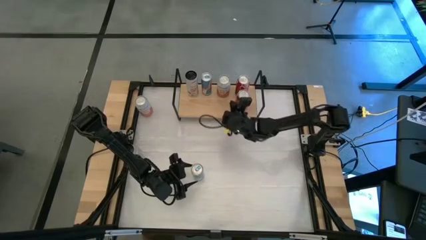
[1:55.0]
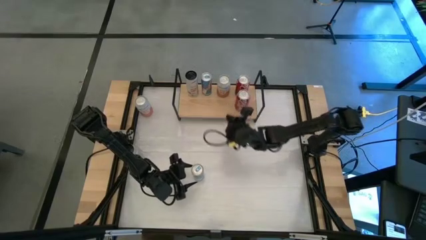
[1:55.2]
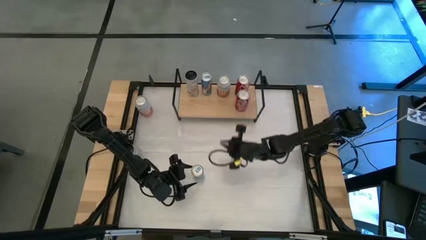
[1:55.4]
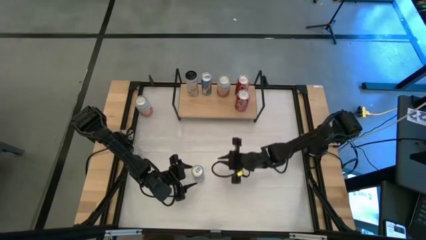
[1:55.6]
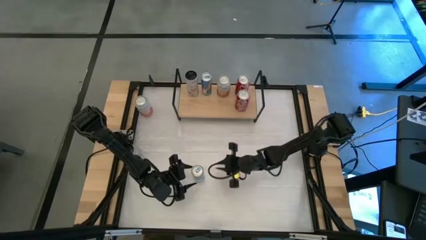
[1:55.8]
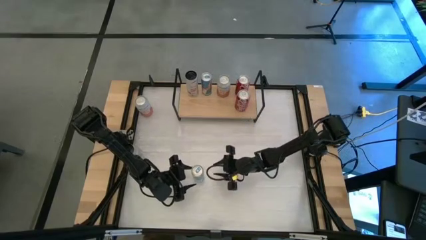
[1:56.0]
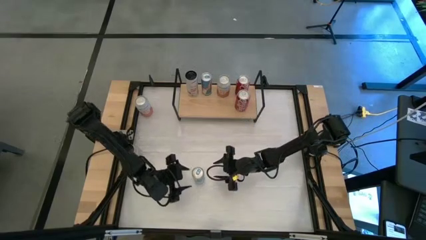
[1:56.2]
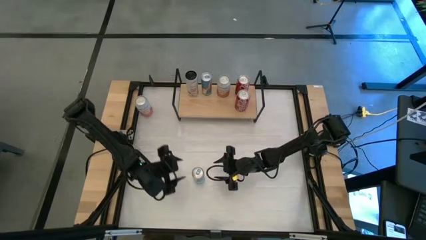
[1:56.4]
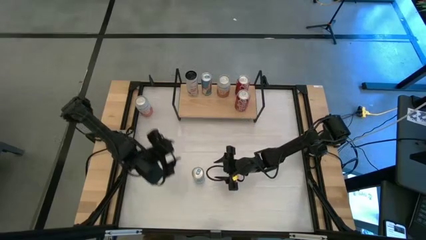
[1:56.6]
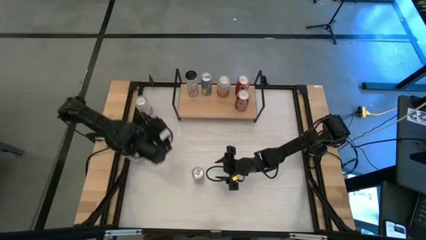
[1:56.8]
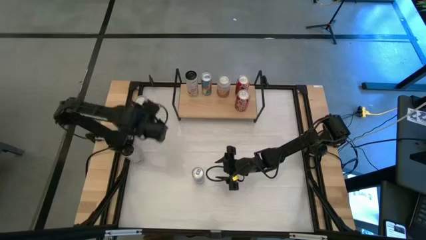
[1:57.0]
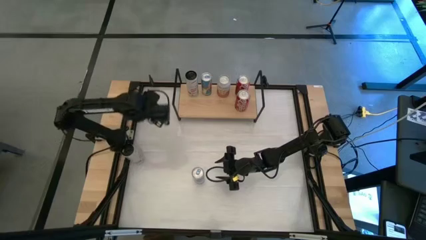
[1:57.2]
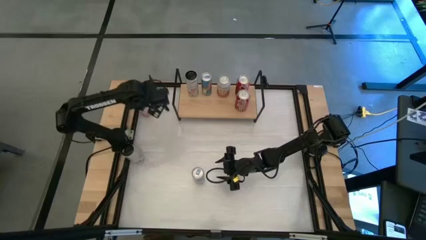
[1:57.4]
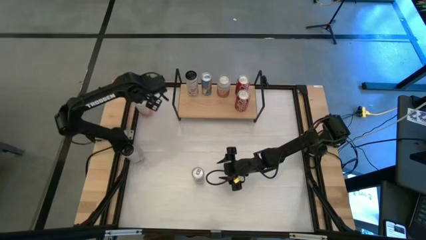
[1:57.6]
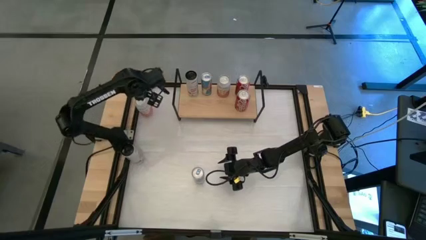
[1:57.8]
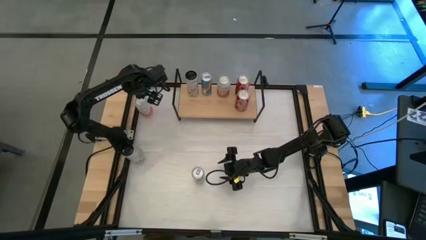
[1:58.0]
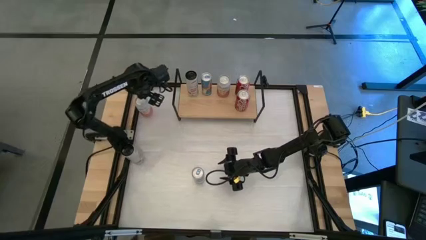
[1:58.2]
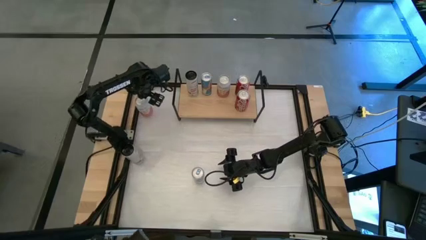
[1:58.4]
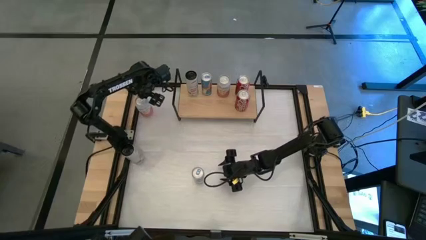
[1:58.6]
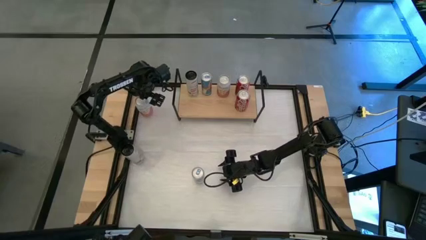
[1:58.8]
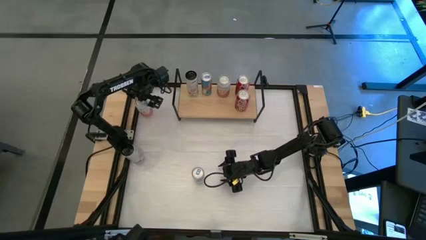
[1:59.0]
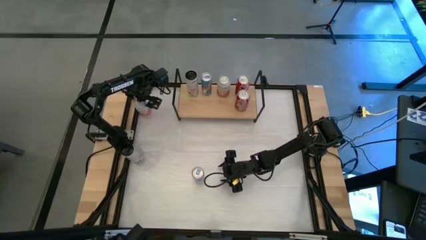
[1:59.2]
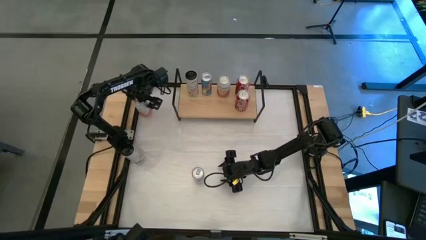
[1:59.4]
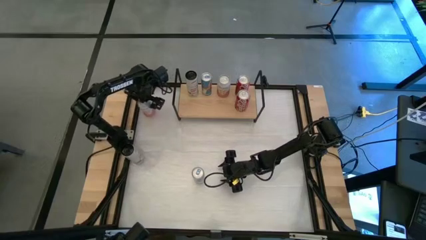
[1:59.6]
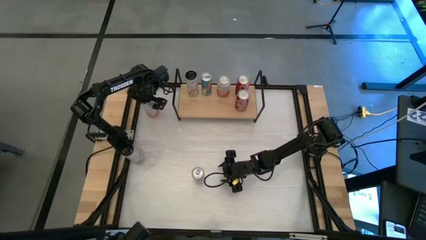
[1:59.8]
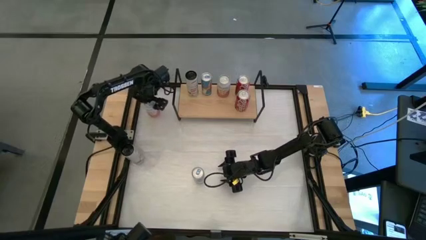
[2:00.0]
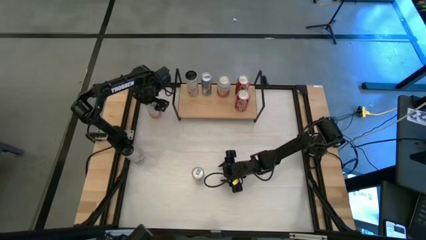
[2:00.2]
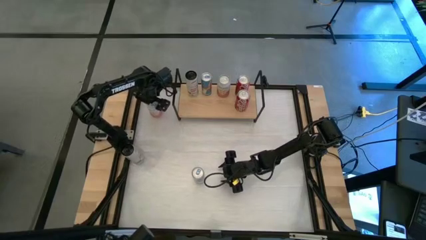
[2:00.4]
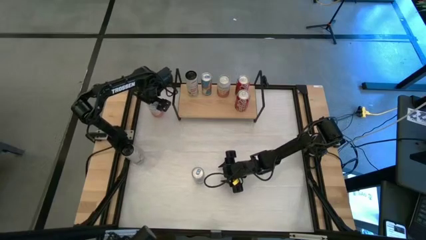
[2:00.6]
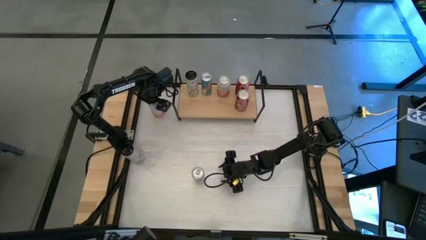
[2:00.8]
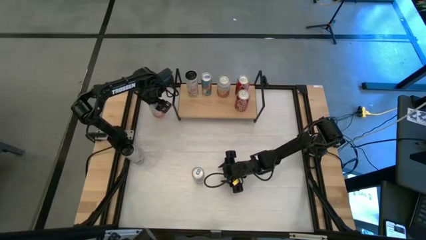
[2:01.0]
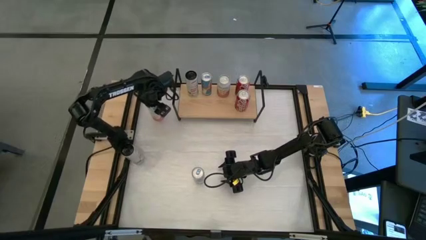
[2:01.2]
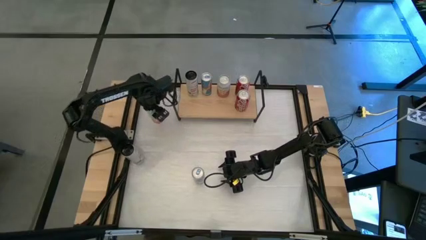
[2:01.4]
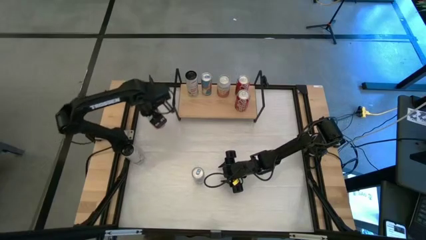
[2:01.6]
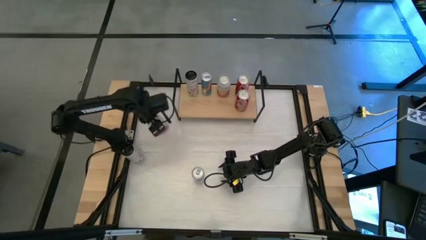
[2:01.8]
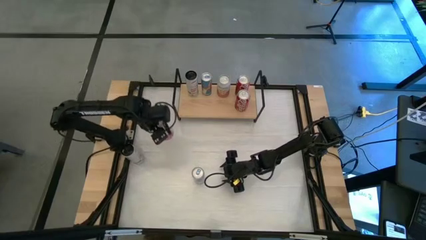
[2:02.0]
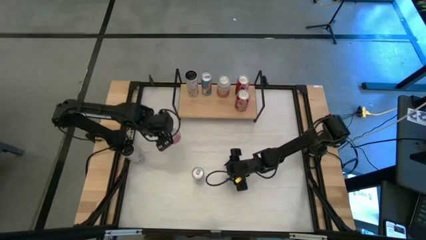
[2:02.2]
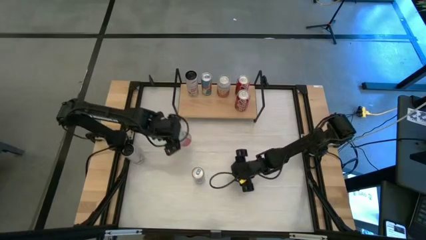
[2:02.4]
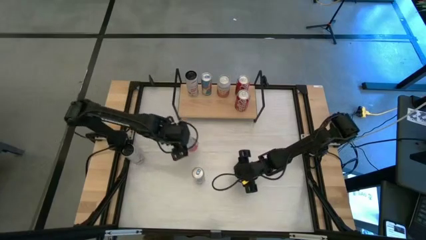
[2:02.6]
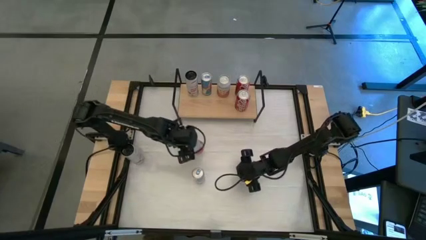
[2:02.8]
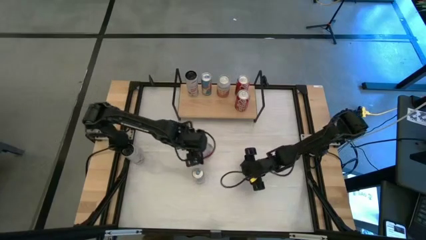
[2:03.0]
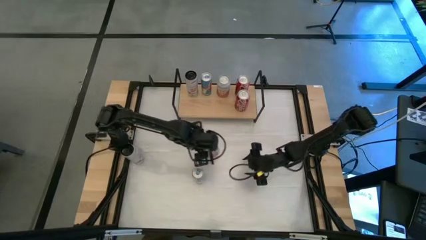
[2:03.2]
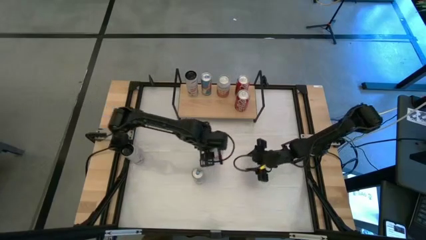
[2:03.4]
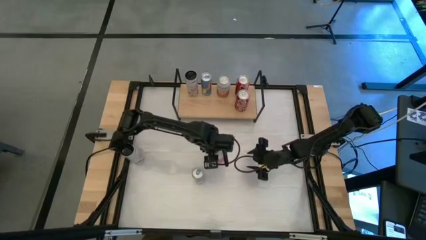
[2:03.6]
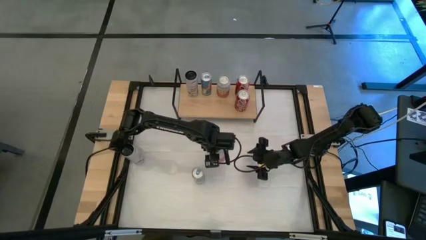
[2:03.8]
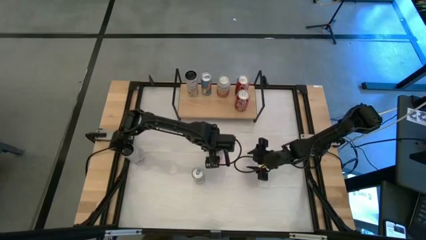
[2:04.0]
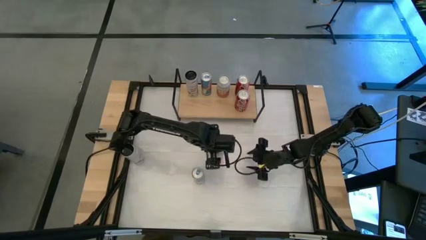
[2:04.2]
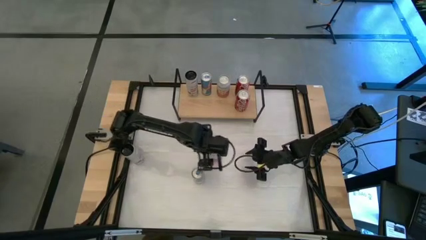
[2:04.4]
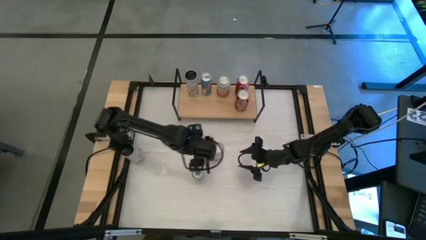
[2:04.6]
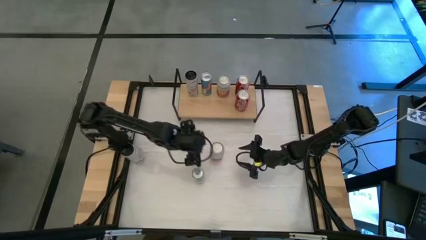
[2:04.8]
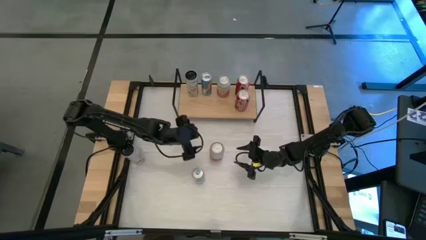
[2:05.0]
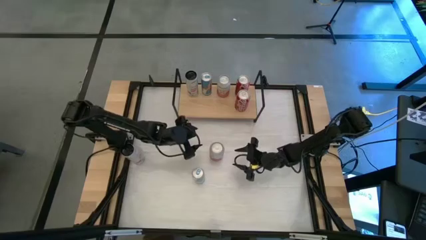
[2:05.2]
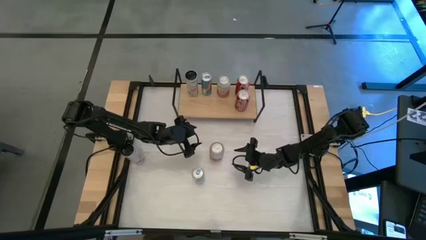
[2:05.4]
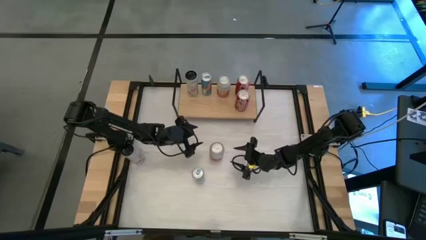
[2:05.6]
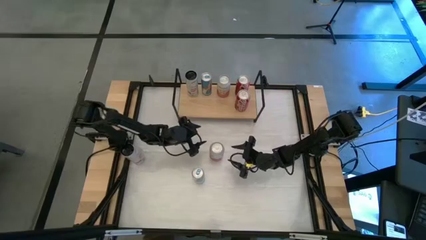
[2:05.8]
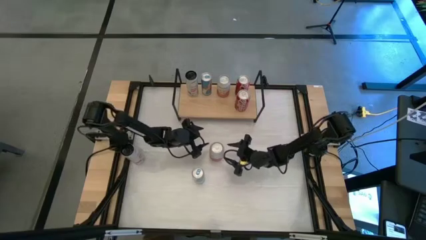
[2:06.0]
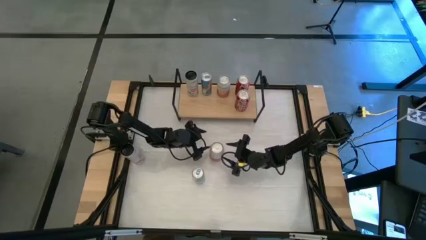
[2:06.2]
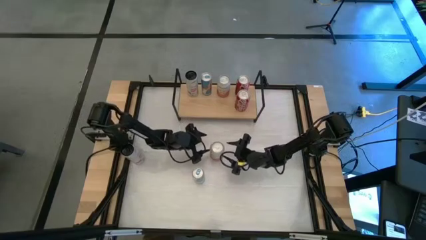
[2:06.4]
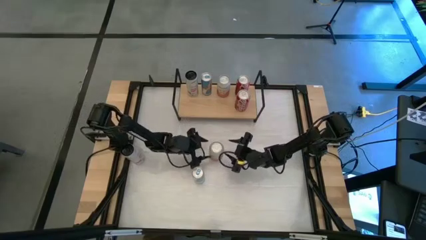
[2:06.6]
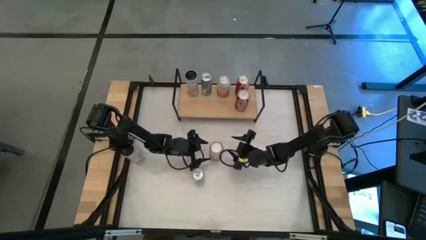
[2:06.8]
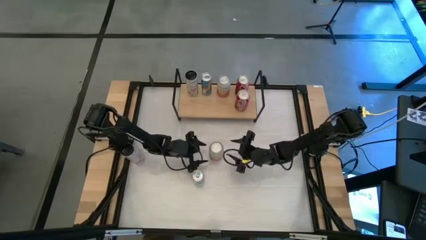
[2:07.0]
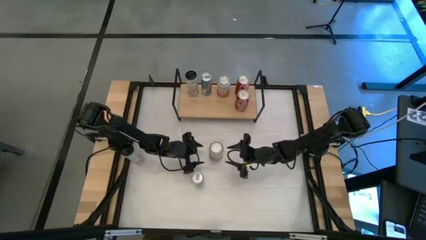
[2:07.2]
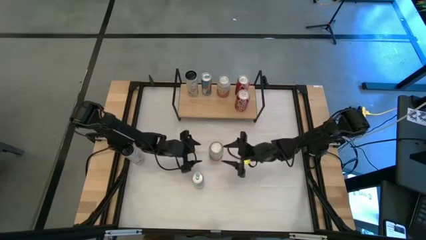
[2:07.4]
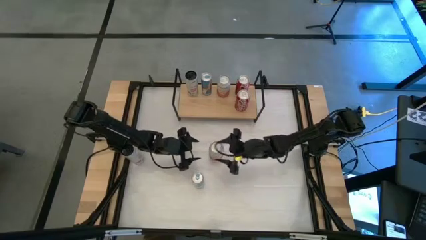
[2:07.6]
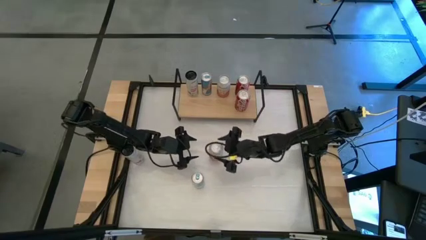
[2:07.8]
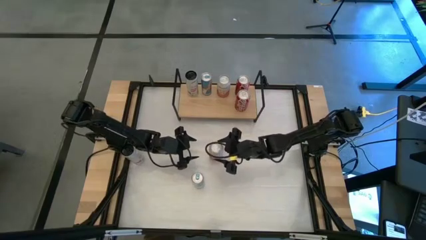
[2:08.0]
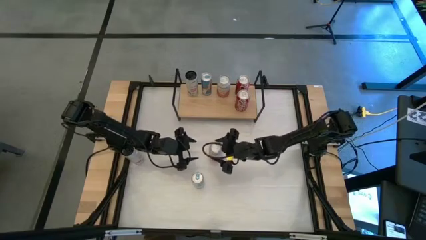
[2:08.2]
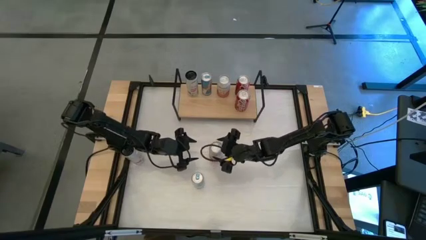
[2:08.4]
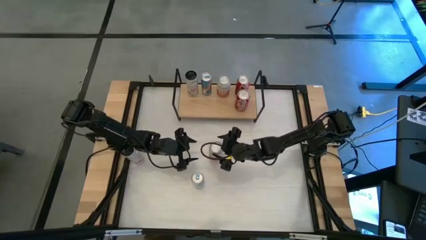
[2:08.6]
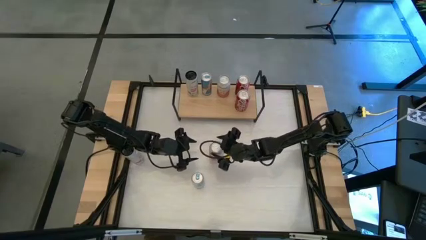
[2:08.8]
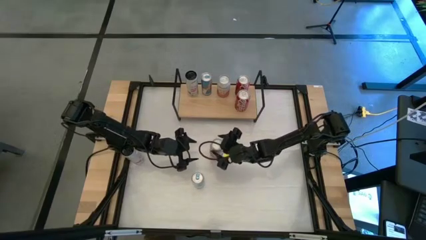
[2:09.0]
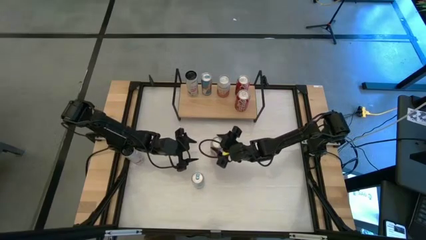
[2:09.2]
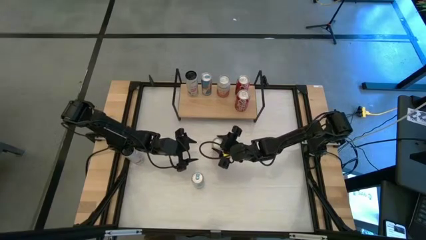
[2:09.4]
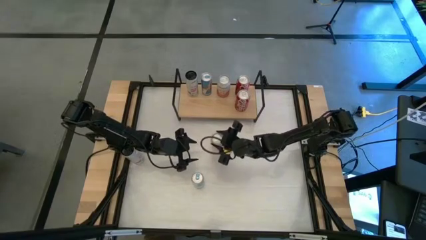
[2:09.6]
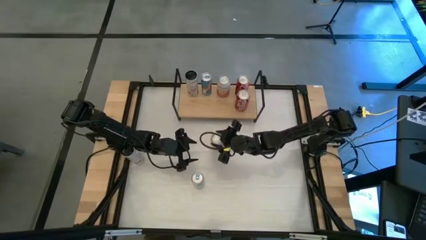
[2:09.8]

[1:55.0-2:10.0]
Task: Place canned beverage on shelf
Put the pink soda can align with the other pink soda can on the shelf

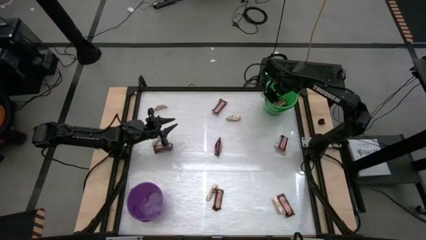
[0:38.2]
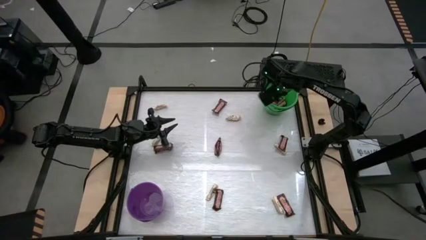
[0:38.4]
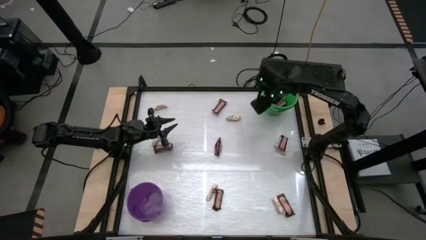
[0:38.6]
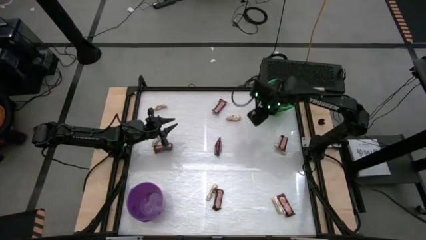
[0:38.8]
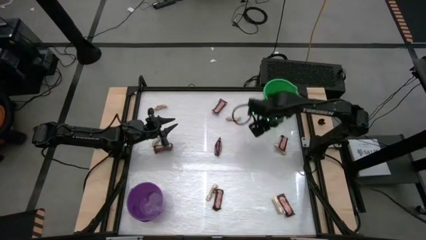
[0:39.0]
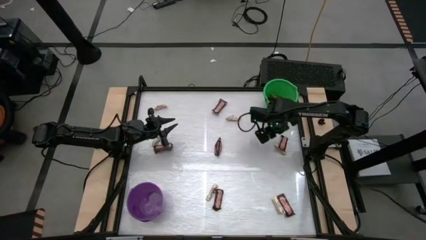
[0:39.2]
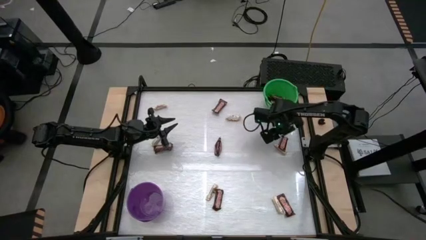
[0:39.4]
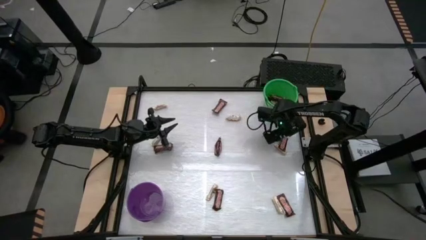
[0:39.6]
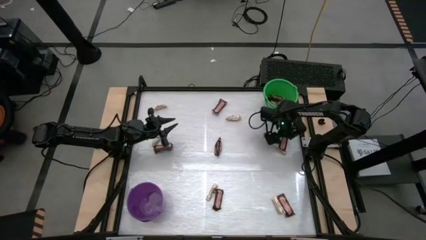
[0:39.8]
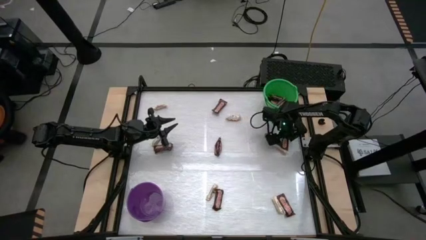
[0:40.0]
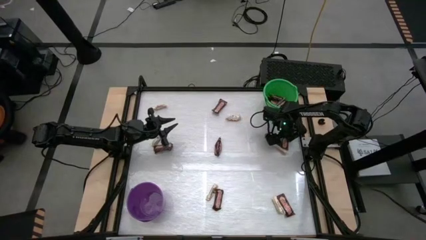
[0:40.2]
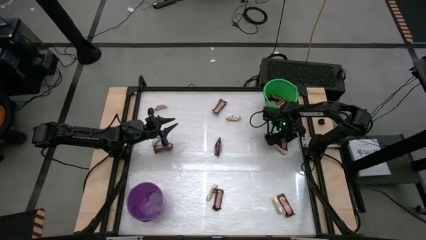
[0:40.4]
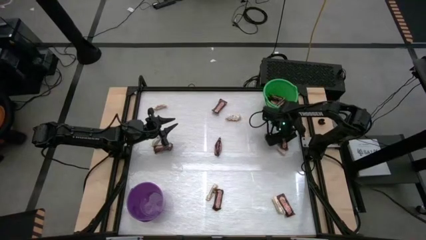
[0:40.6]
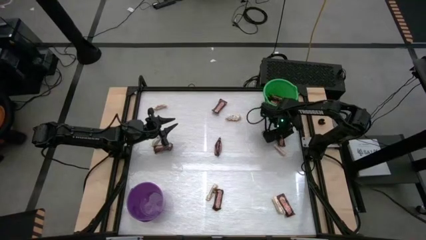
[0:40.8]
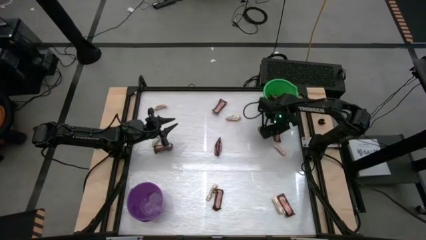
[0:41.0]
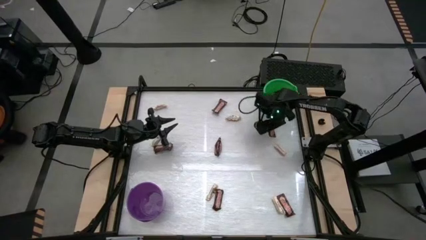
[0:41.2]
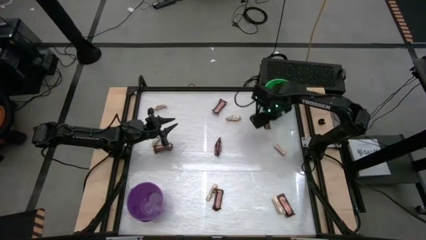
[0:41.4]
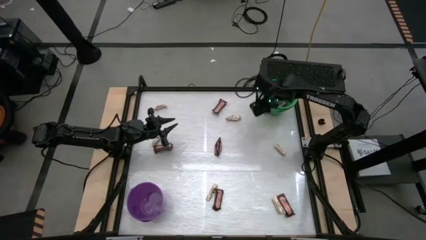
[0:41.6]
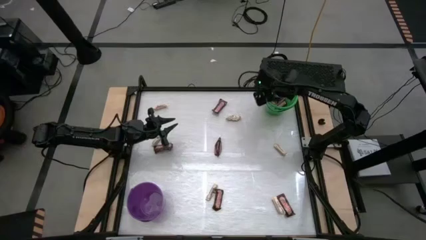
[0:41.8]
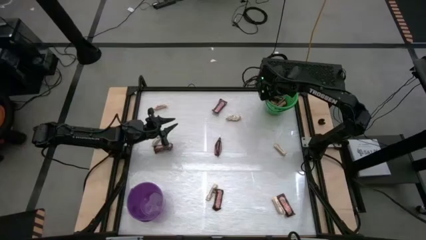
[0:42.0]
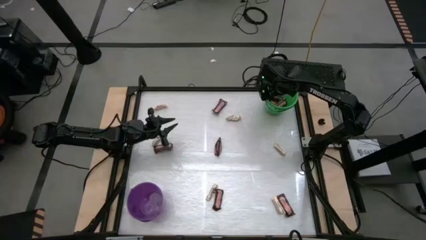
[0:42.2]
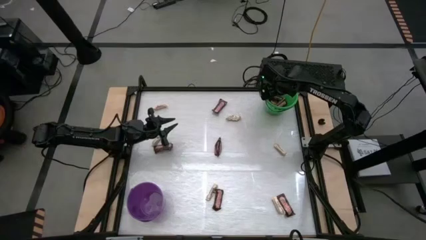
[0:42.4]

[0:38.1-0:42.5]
Task: Sort candy by brand, put in halloween buckets
Put the brown candy bar into the green bucket
